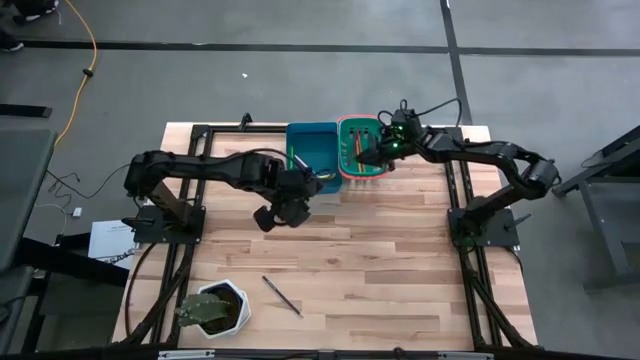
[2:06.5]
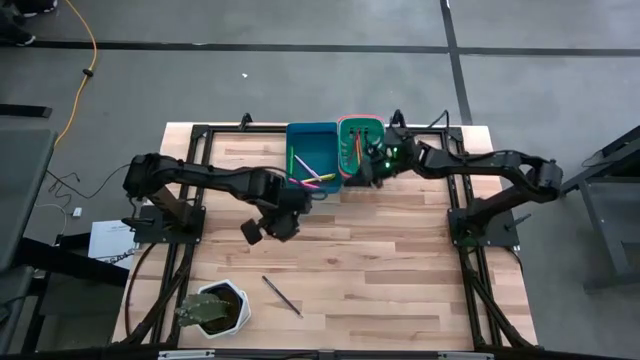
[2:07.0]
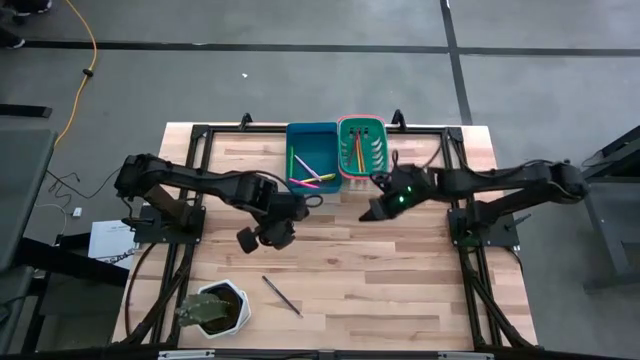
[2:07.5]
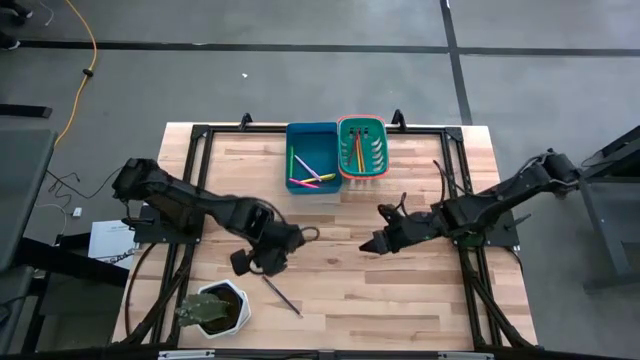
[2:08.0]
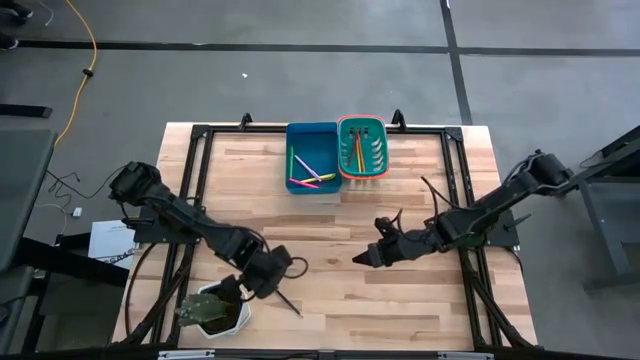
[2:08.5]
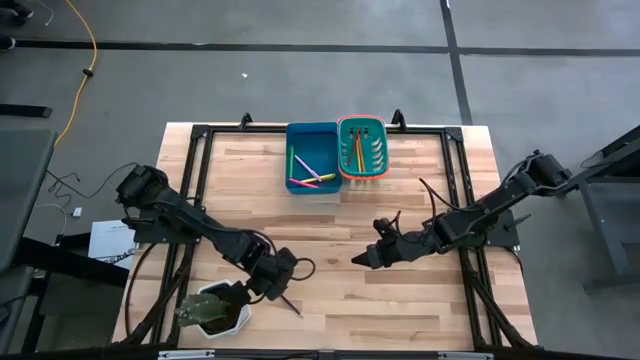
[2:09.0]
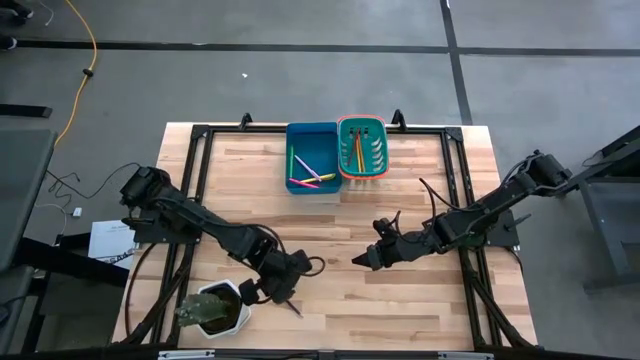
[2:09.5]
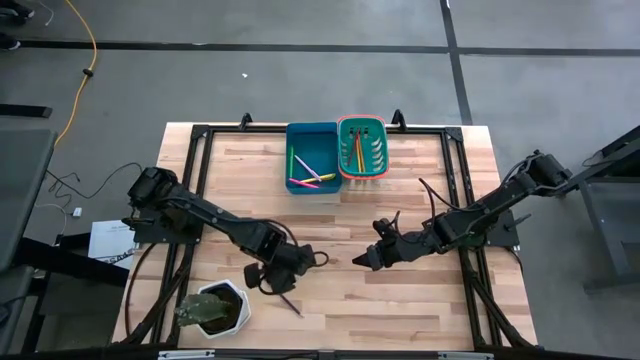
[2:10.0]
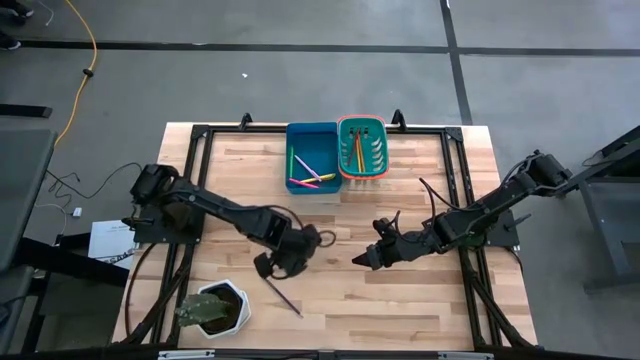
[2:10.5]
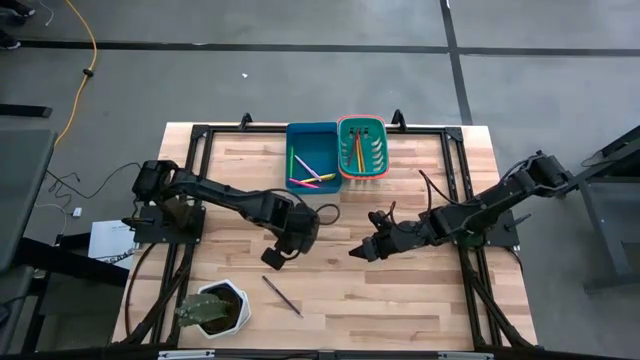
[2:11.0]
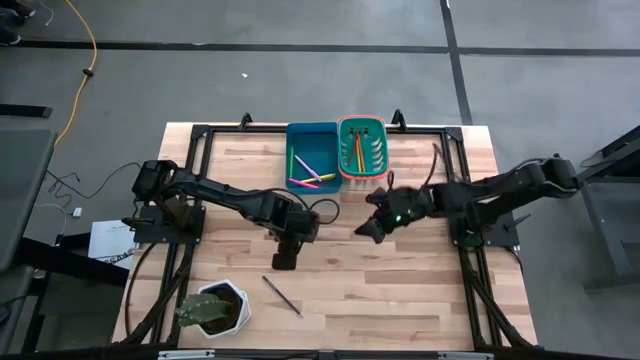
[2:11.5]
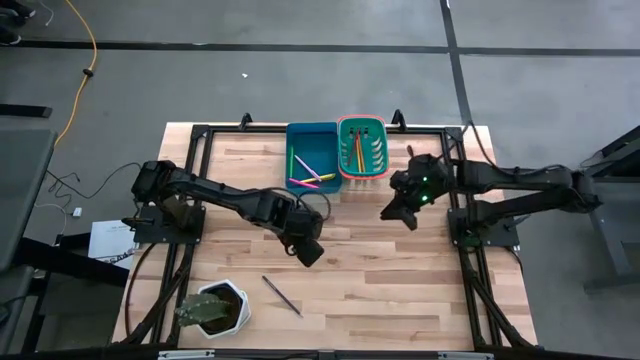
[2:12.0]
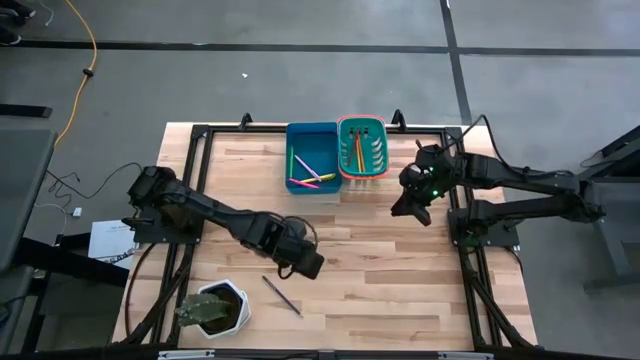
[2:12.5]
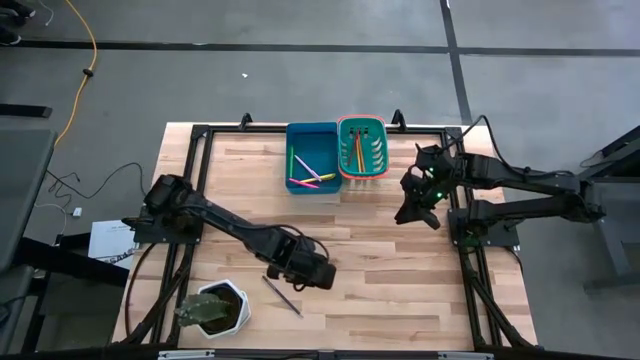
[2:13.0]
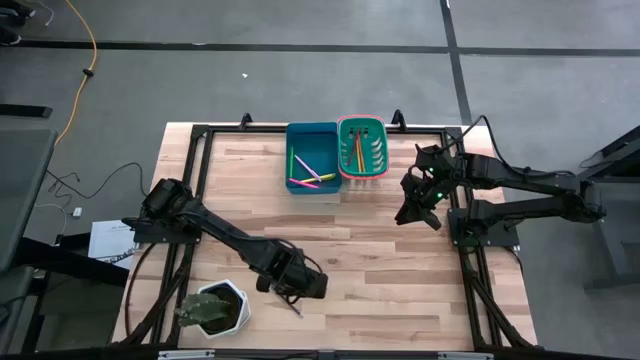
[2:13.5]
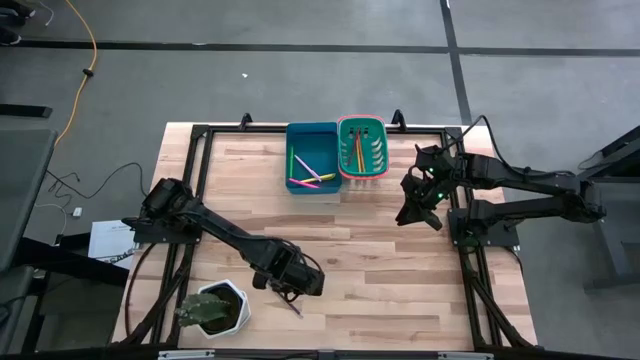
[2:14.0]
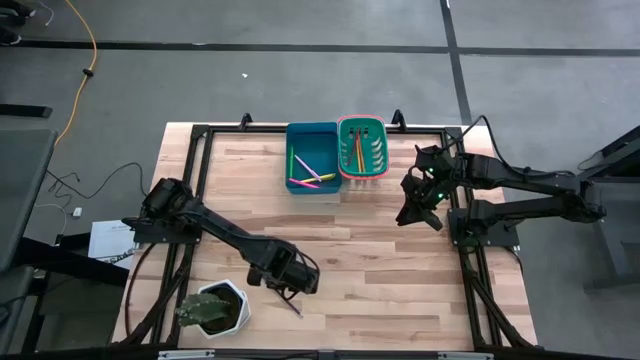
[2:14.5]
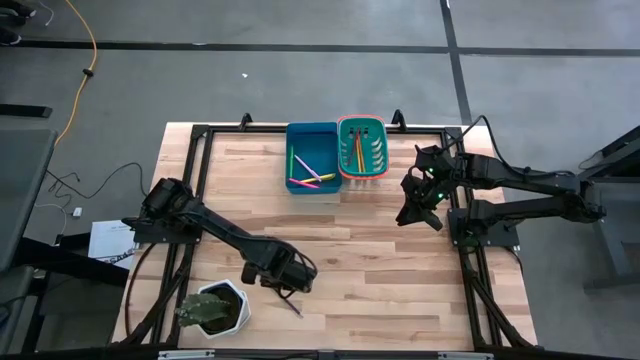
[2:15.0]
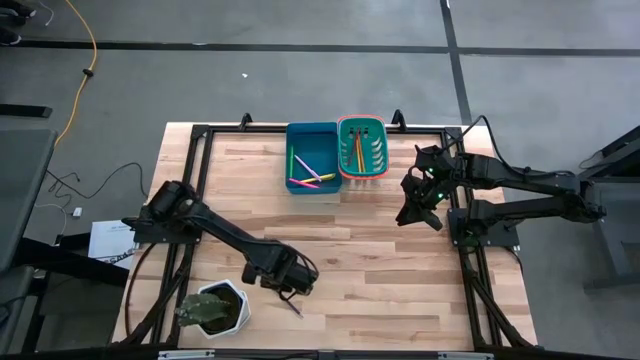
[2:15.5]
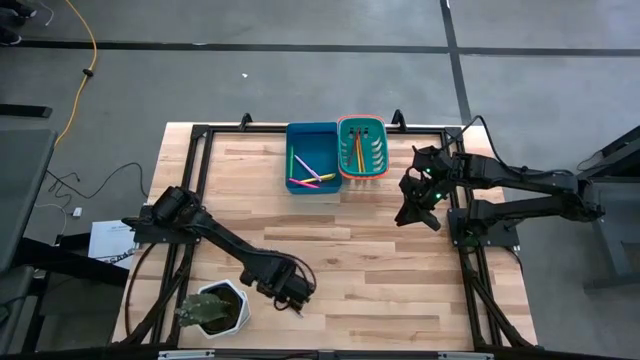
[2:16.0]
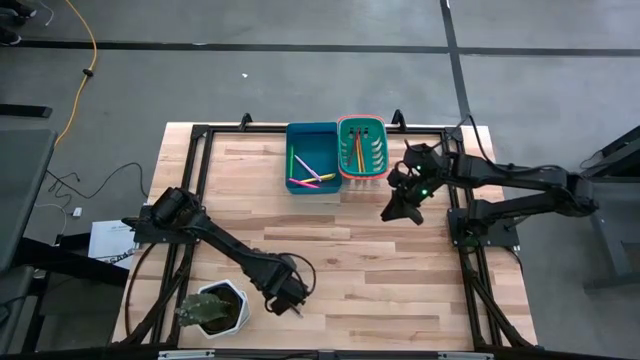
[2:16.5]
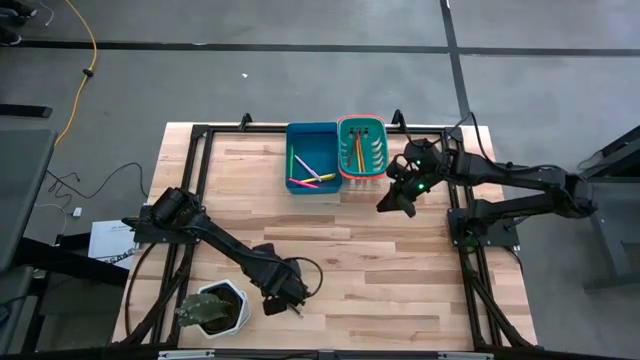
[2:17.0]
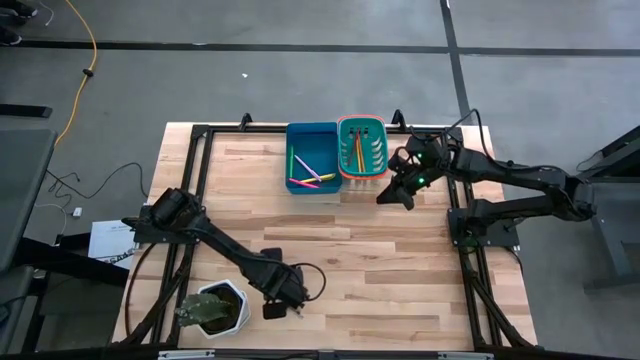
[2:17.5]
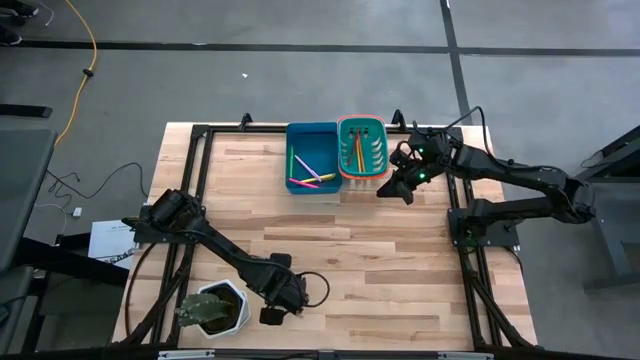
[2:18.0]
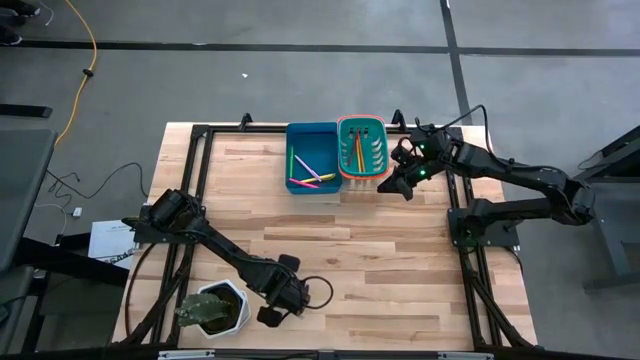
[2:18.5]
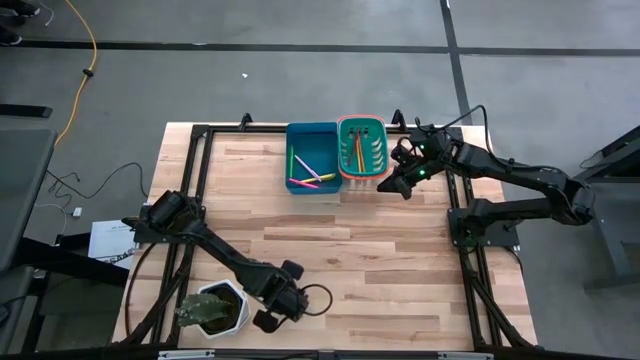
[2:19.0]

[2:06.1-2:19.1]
Task: Sort pens & pencils
Put the blue pencil into the green bin

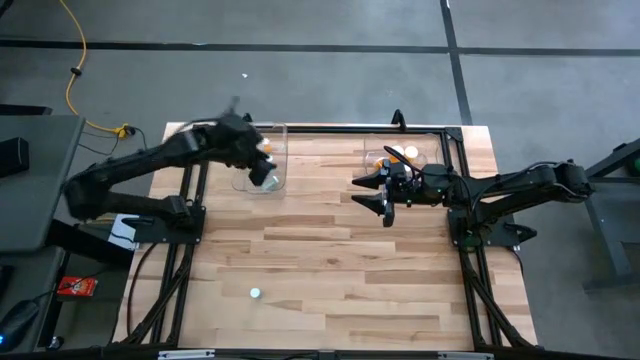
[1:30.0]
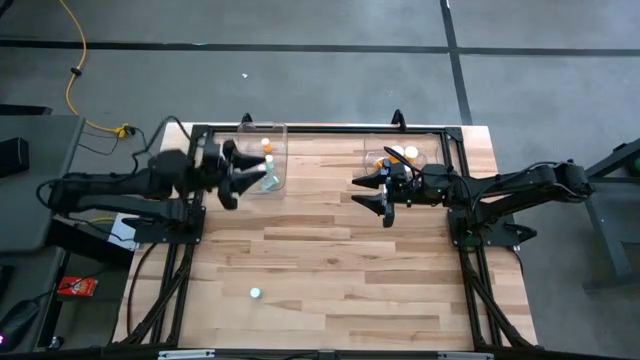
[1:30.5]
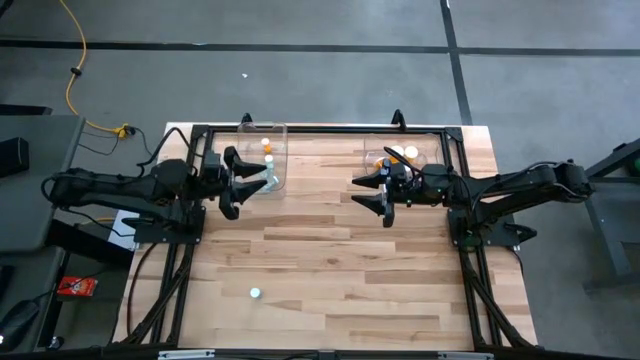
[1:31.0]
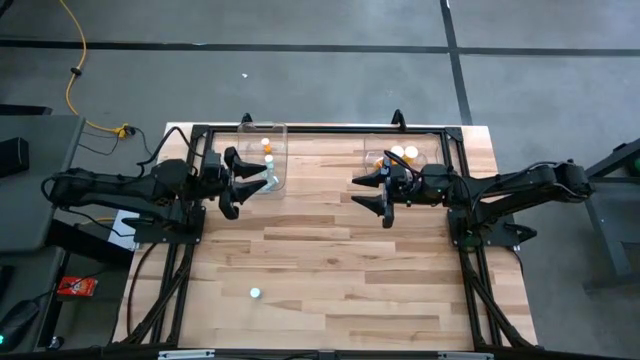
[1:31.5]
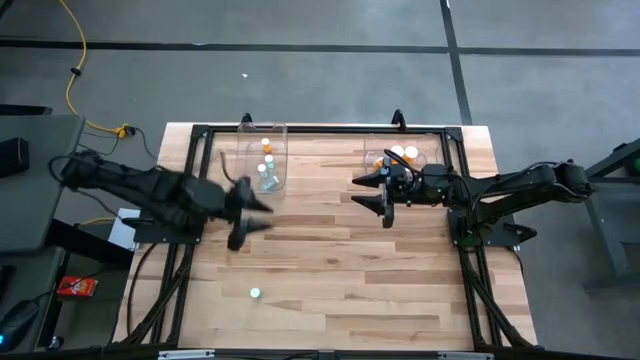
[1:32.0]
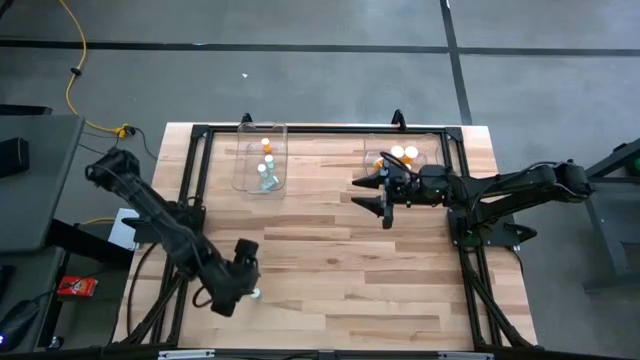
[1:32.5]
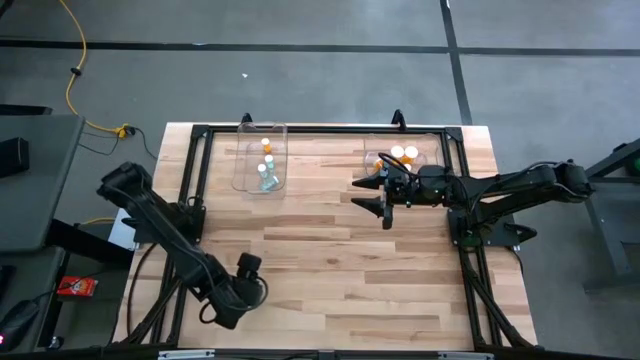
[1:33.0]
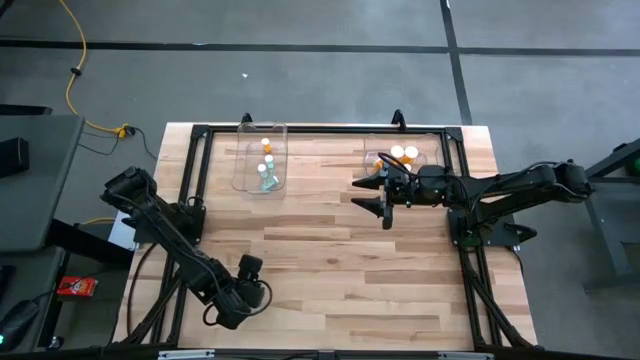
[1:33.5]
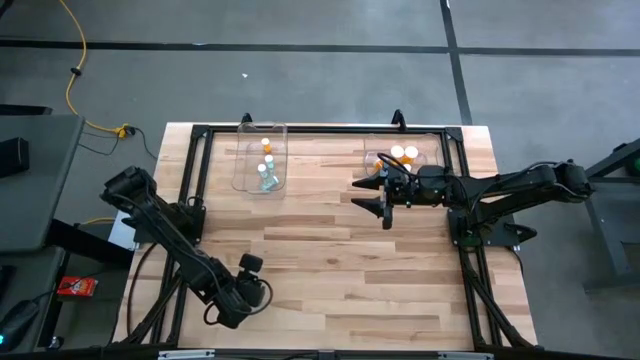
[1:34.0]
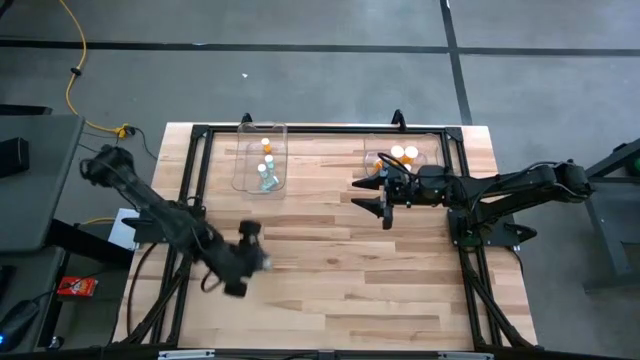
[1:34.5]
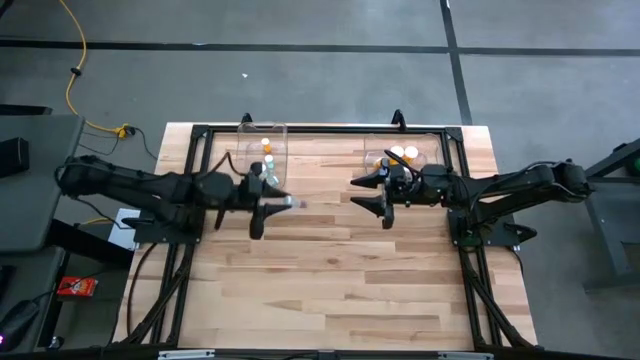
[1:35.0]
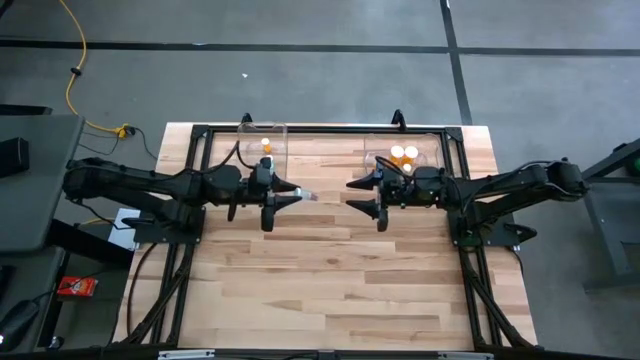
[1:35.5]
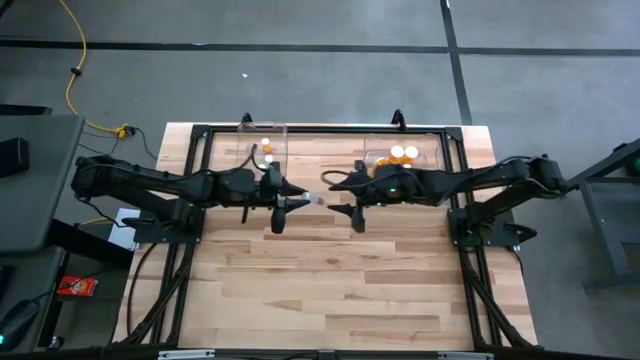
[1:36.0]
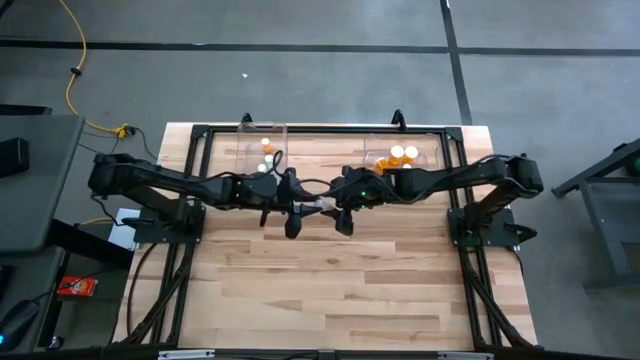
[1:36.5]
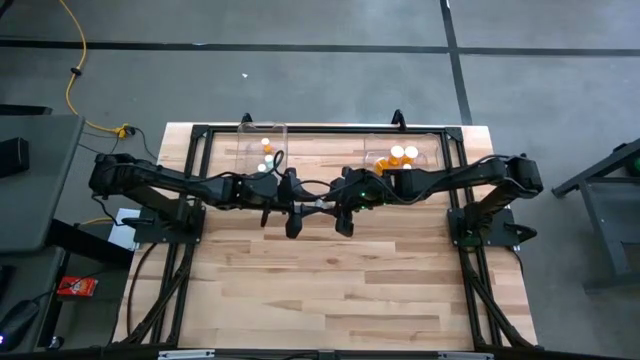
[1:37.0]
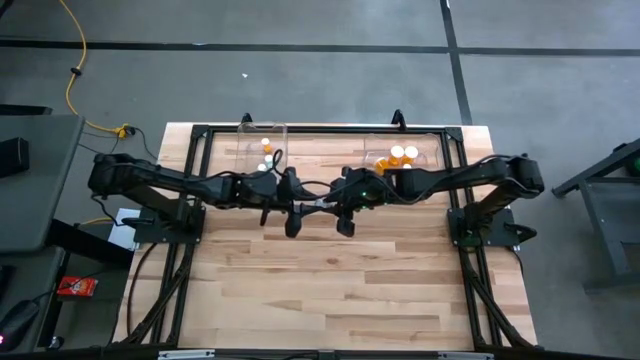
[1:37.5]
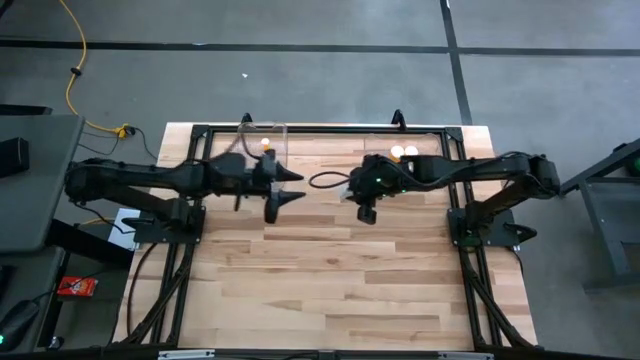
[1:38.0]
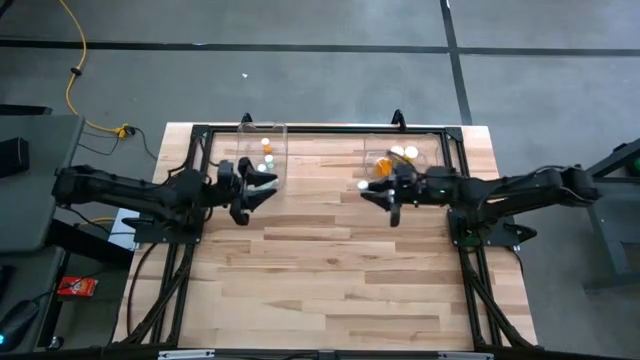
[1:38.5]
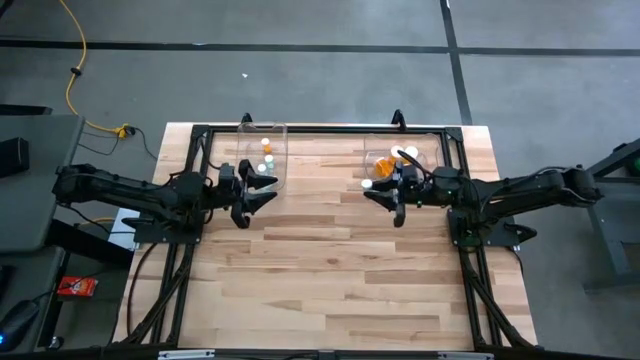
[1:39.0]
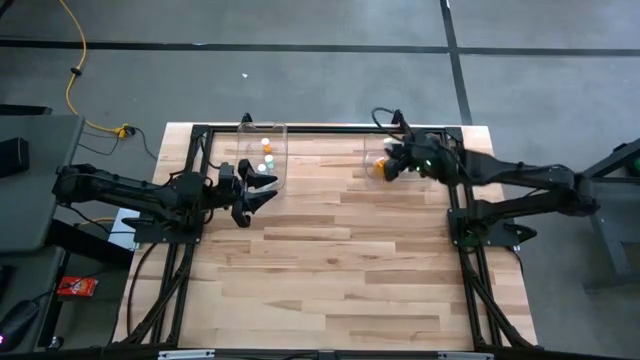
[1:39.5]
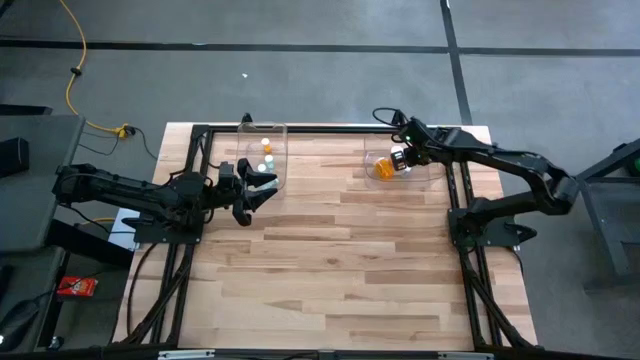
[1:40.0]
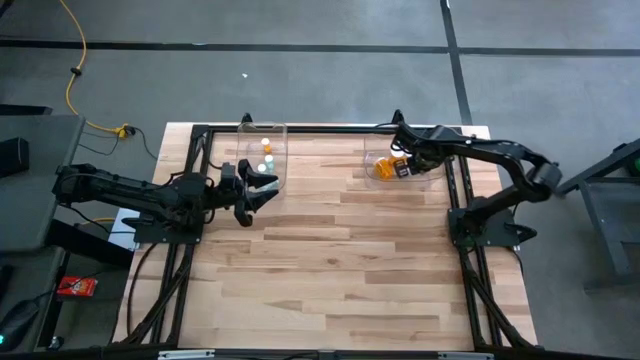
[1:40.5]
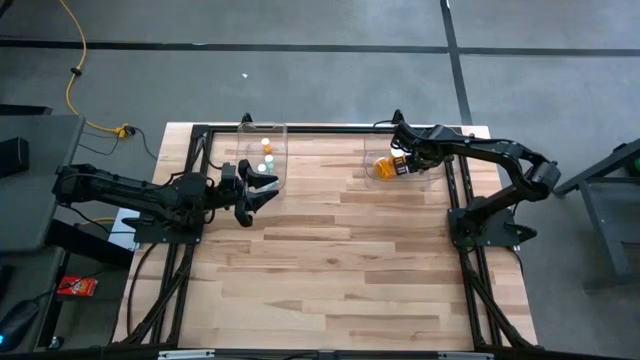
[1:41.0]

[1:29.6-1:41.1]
Task: Pick and place medicine bottles into bin by pill shape (circle, oval)
Put the blue pill bottle into the left transparent bin
